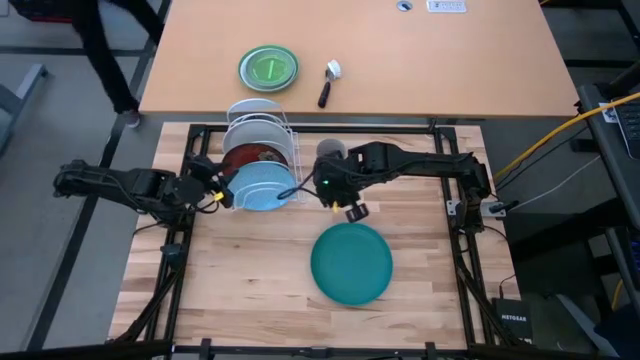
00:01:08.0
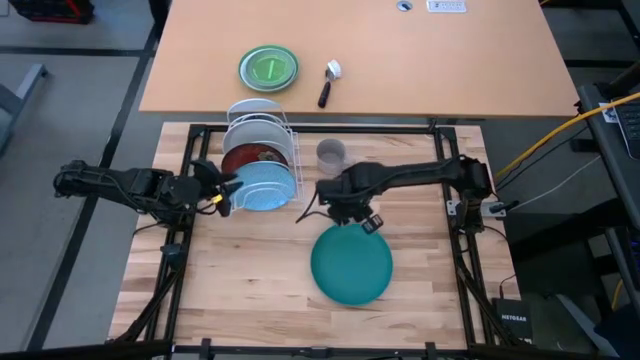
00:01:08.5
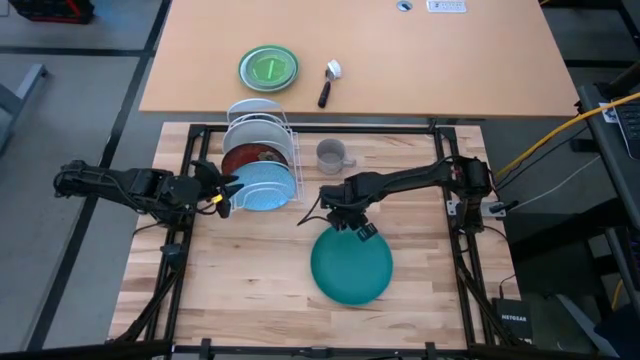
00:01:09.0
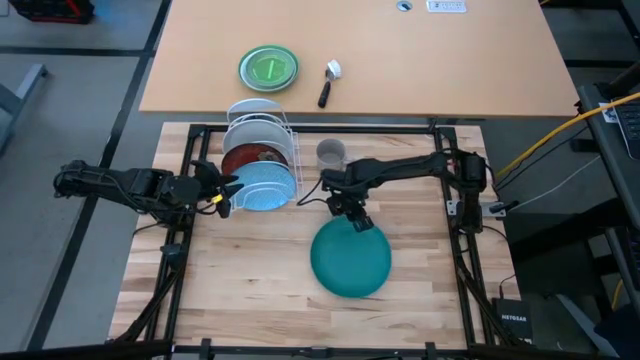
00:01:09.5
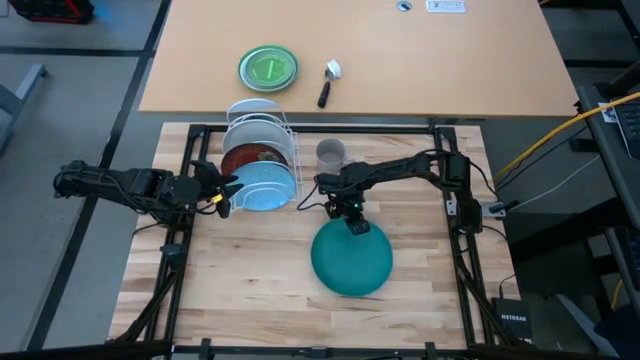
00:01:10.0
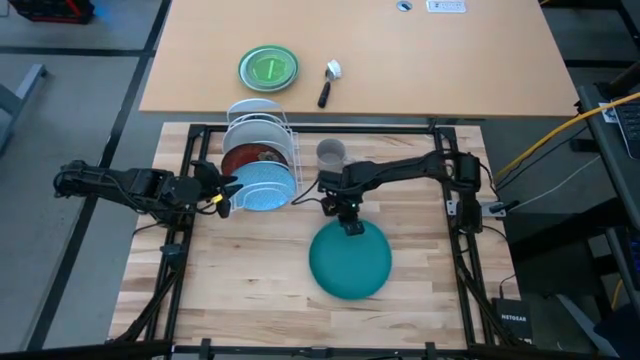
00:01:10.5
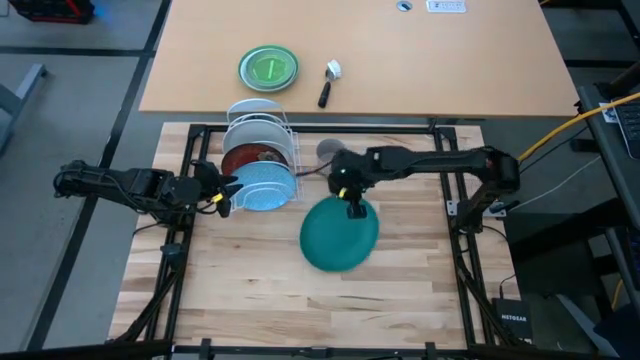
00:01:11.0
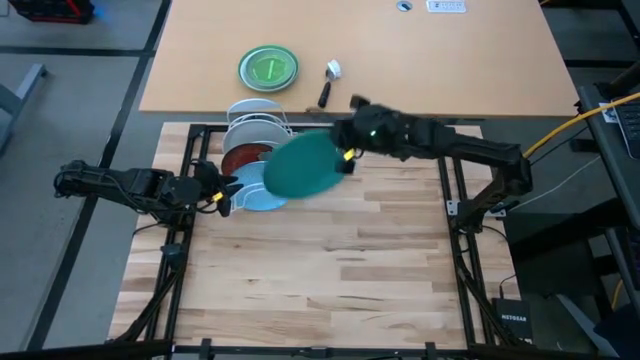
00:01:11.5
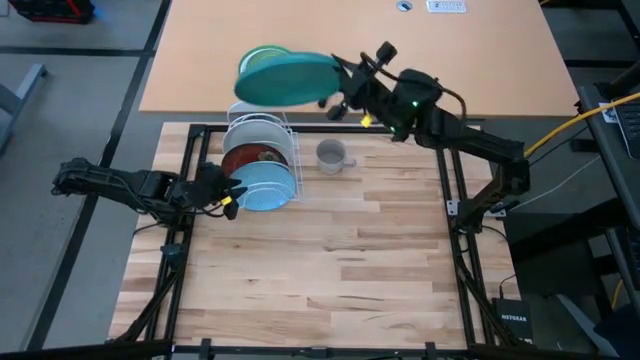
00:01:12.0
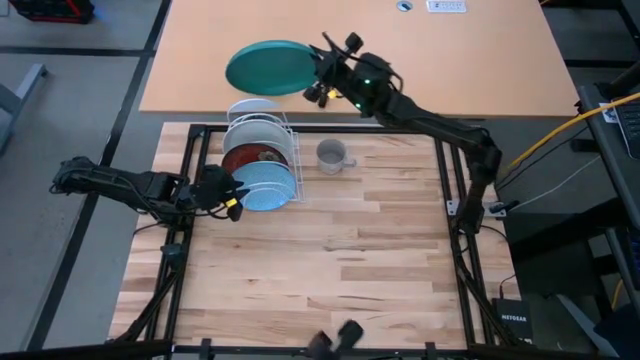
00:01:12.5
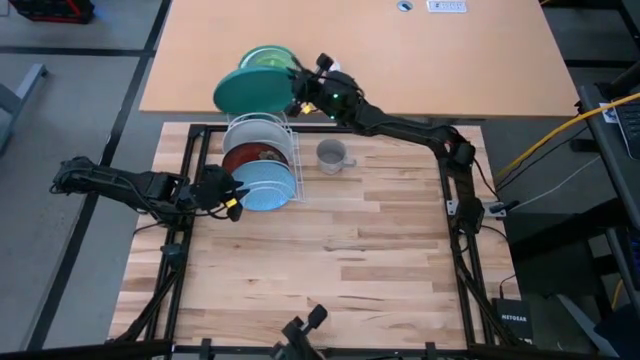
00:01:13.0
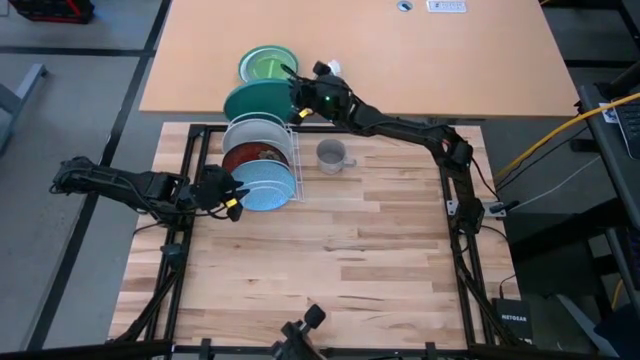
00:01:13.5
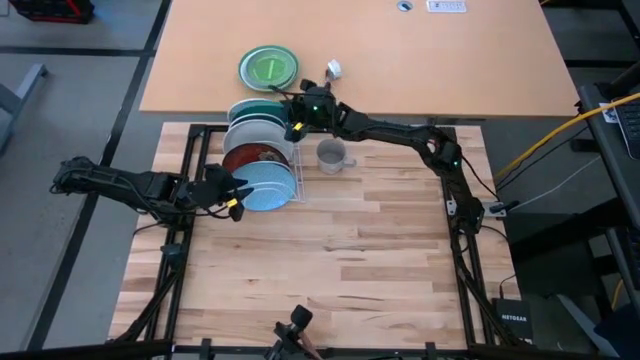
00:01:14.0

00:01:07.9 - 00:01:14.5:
Task: Sort dishes
Put the green plate into the dish rack

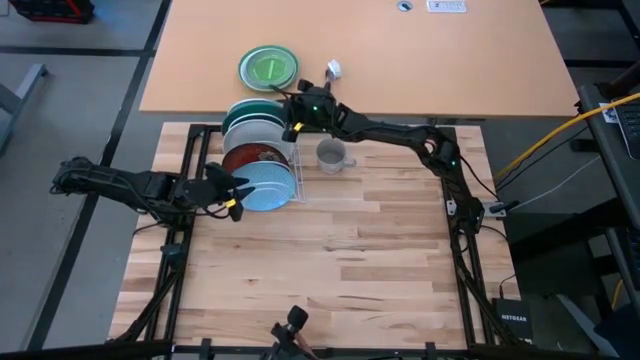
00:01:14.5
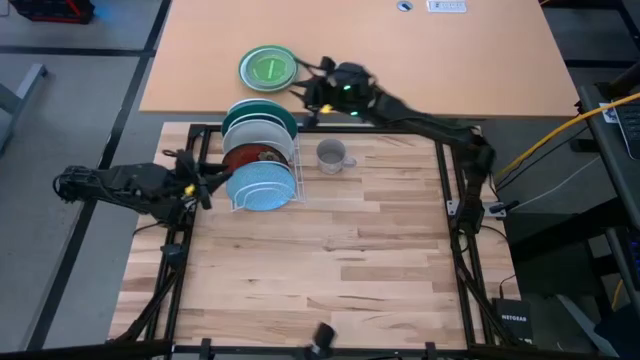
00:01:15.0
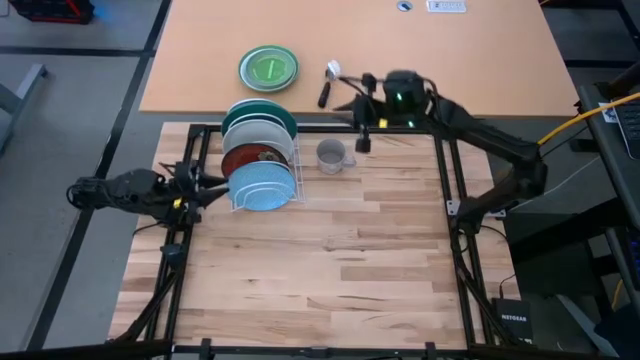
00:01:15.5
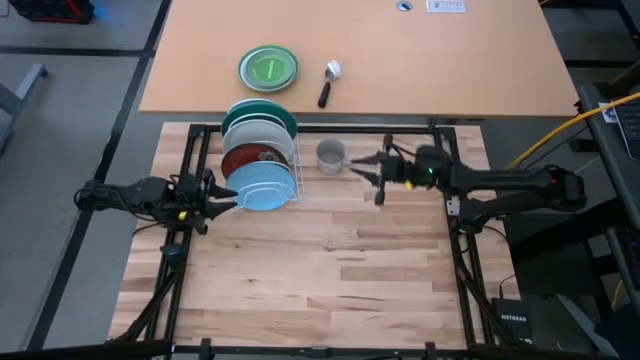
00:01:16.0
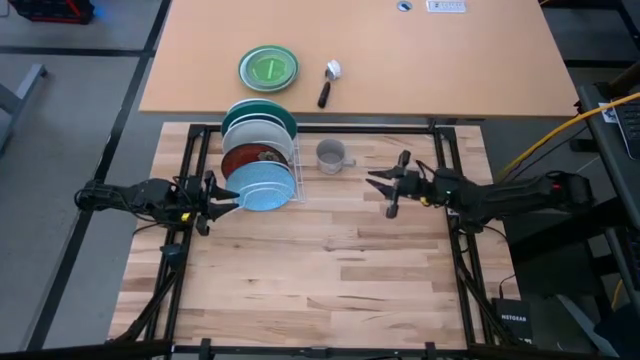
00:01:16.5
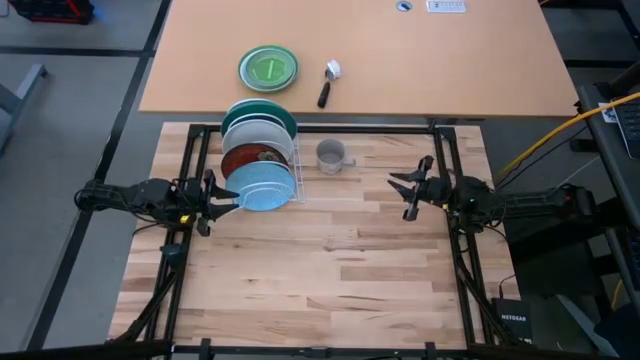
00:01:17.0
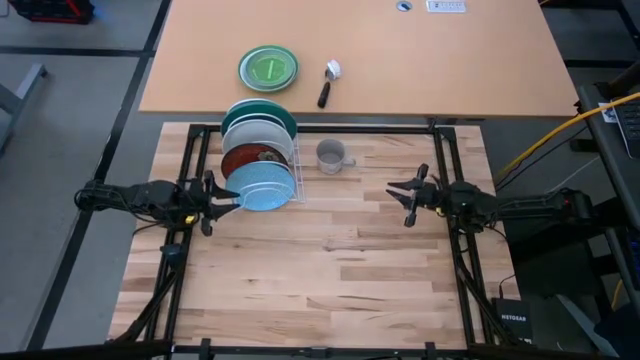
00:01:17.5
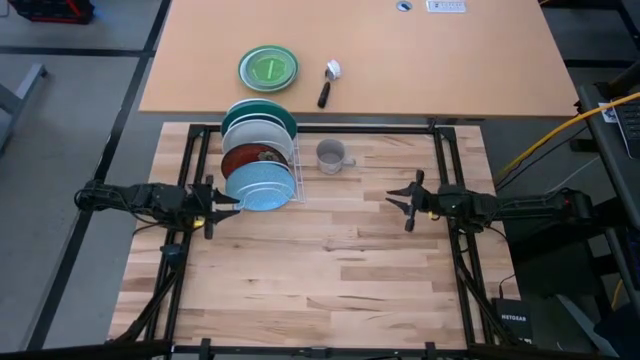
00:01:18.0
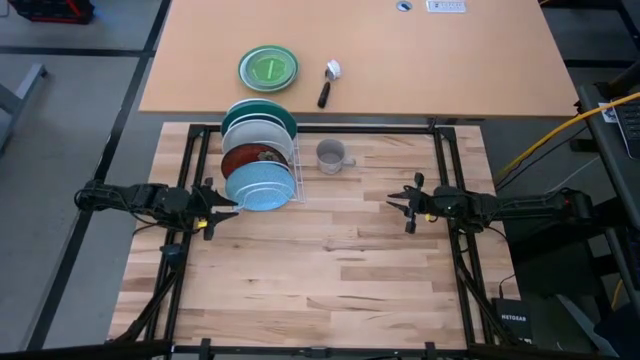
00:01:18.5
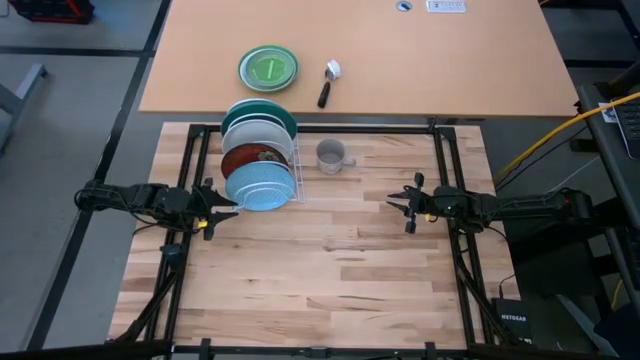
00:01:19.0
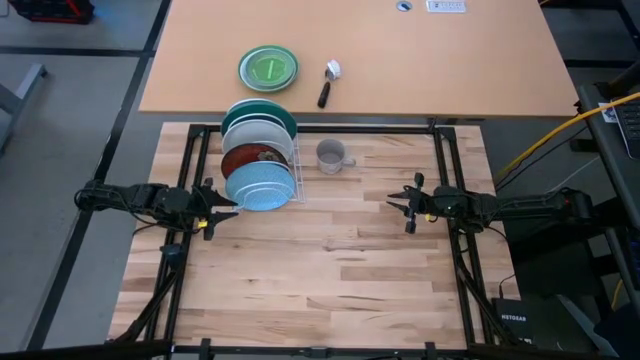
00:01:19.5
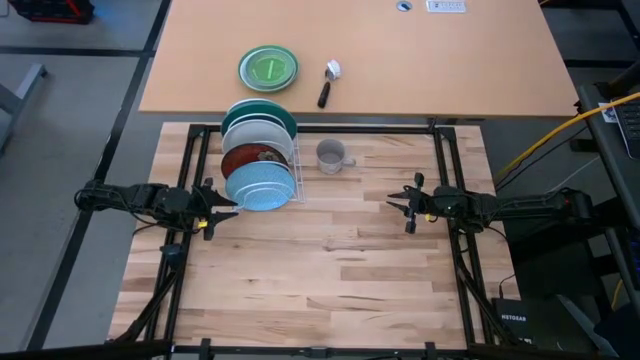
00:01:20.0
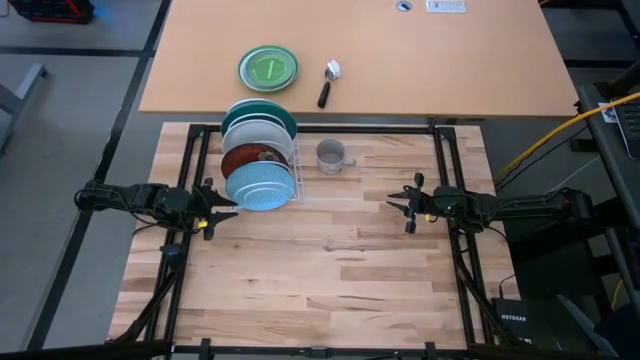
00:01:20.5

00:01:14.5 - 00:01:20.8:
Return to Home Position

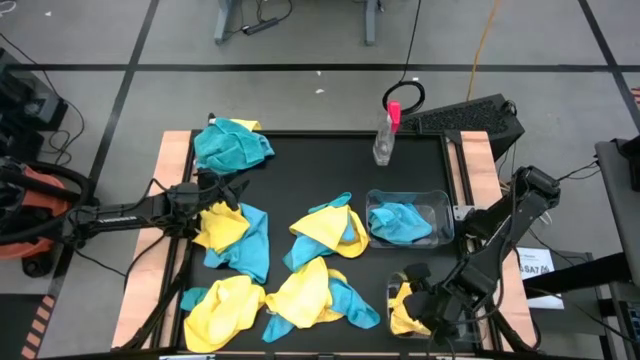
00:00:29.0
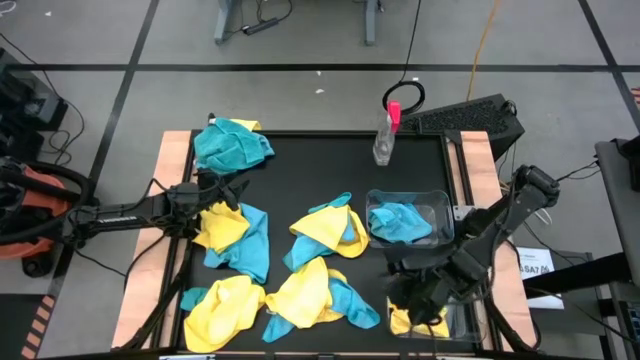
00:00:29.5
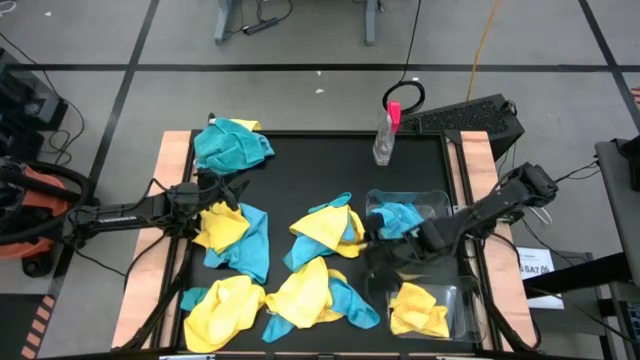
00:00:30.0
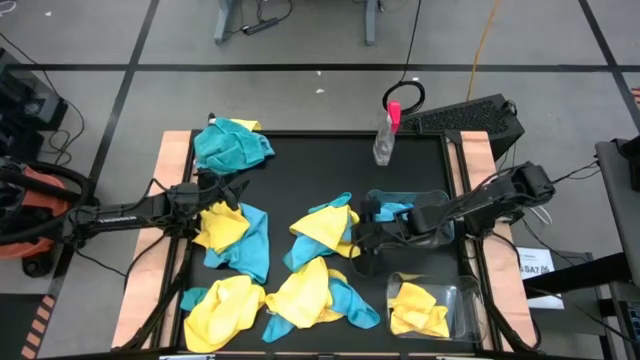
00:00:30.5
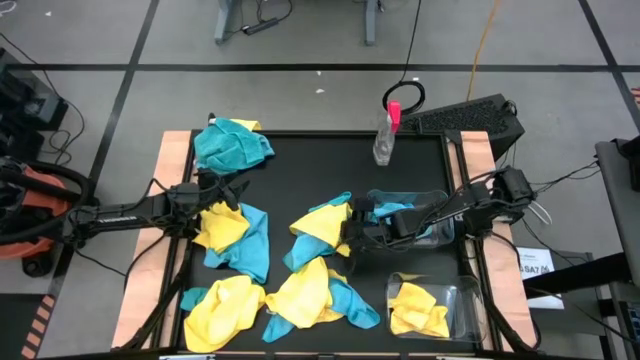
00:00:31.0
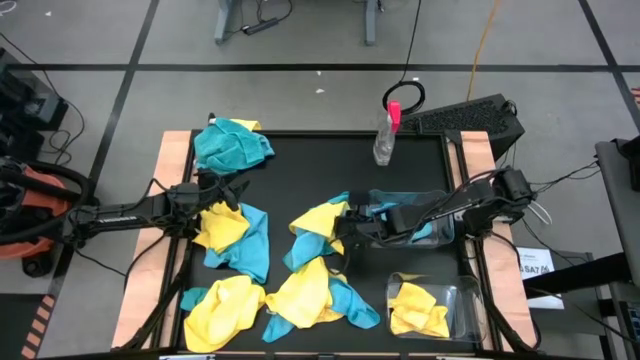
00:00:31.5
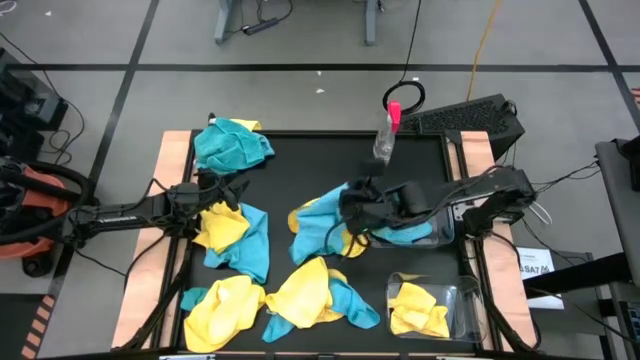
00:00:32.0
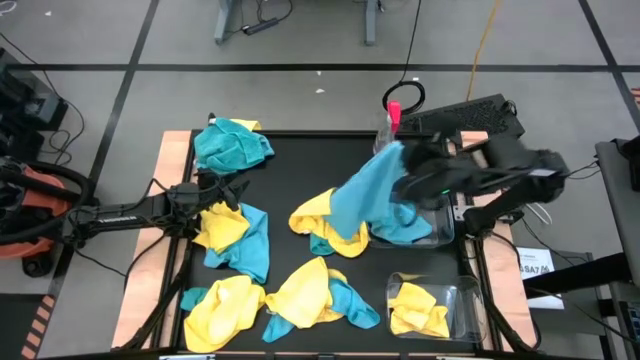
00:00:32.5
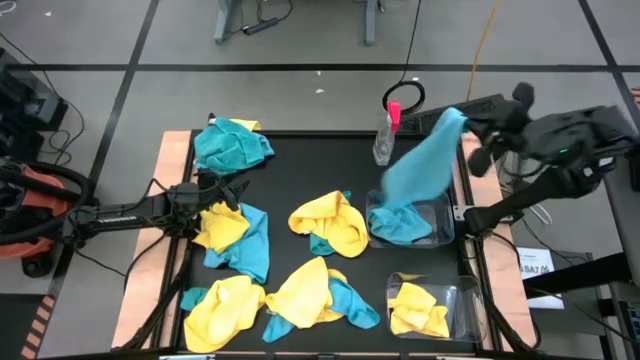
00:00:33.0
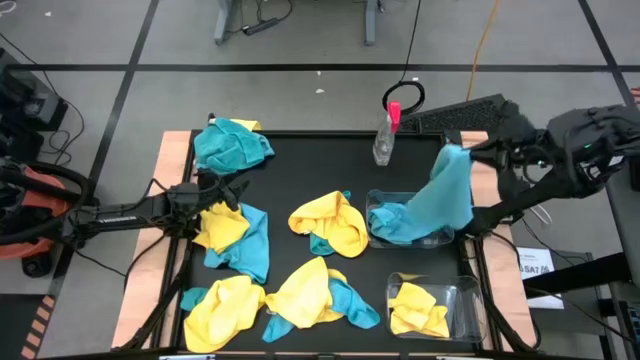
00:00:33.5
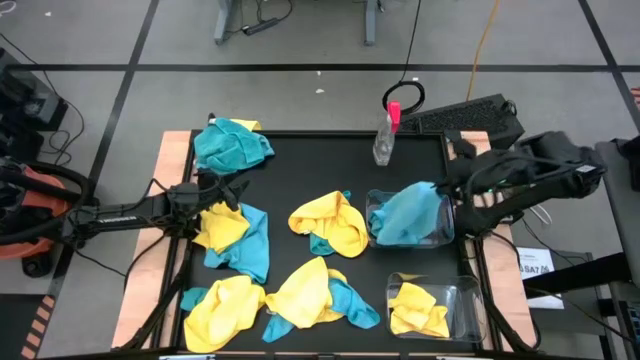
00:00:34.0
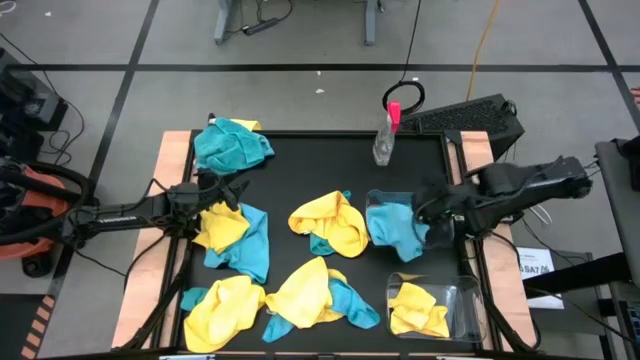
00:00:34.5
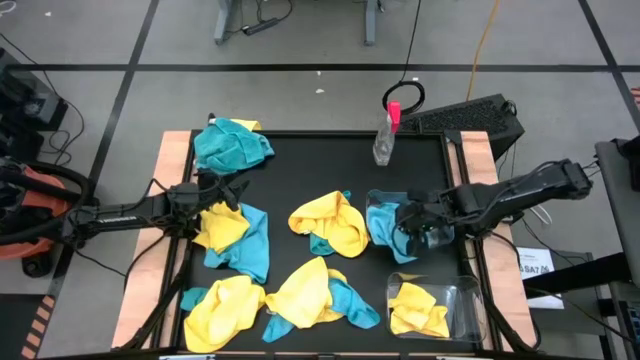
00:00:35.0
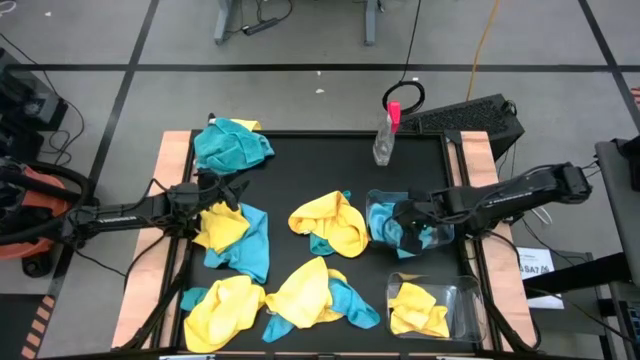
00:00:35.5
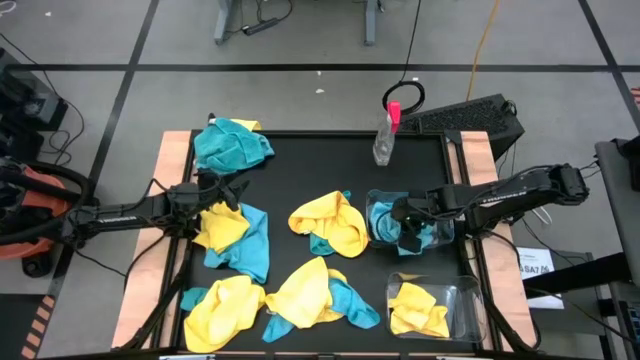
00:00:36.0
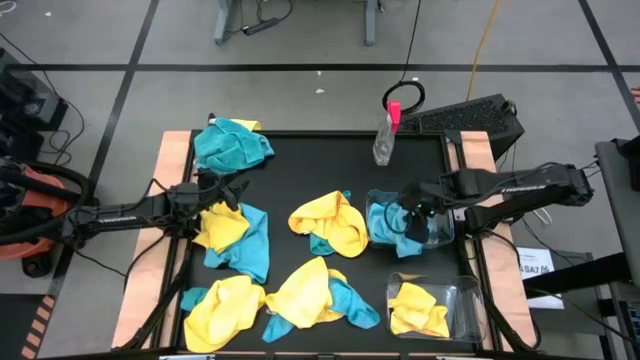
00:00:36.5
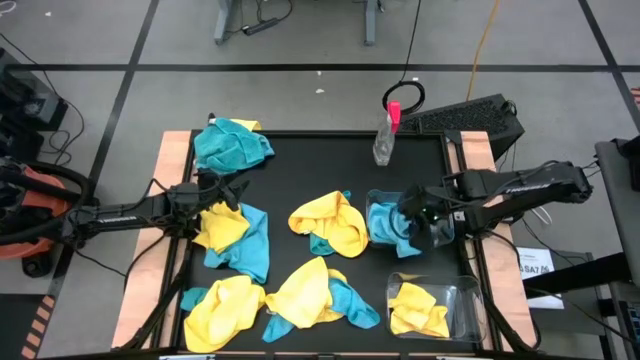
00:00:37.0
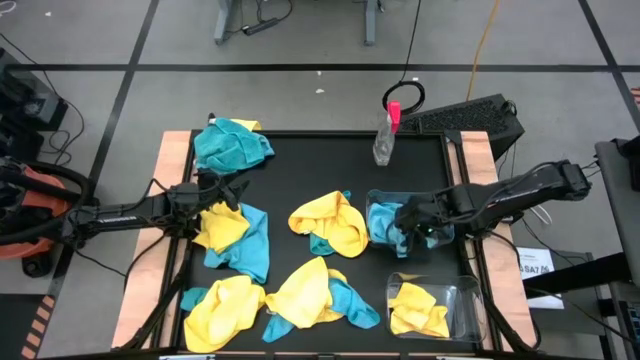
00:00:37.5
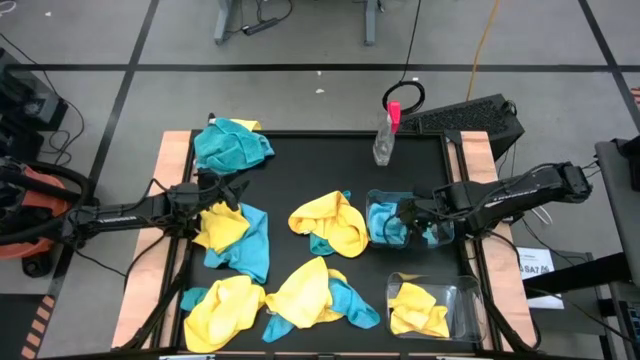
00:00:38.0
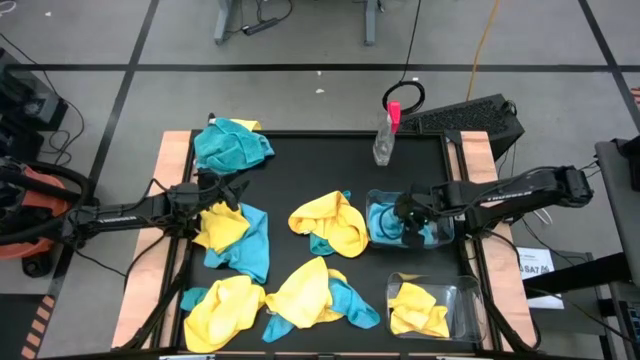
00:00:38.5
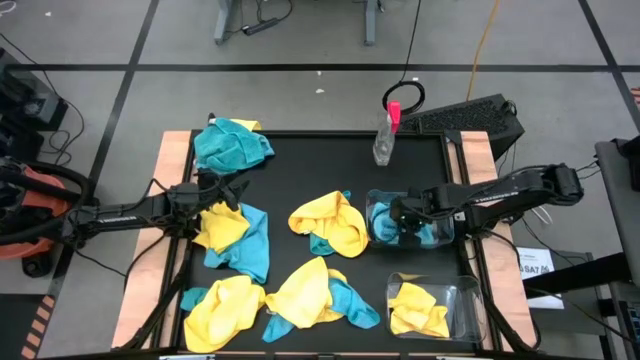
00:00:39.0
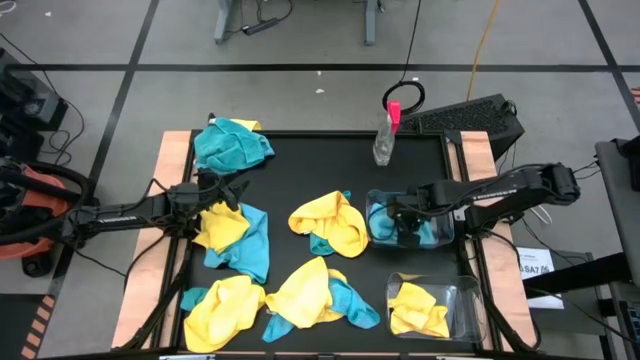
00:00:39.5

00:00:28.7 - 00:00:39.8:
Task: Sort microfiber towel by color & place in baskets
Put the blue towel into the top transparent bin
